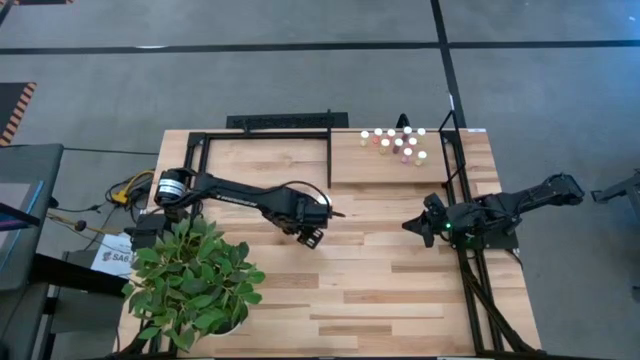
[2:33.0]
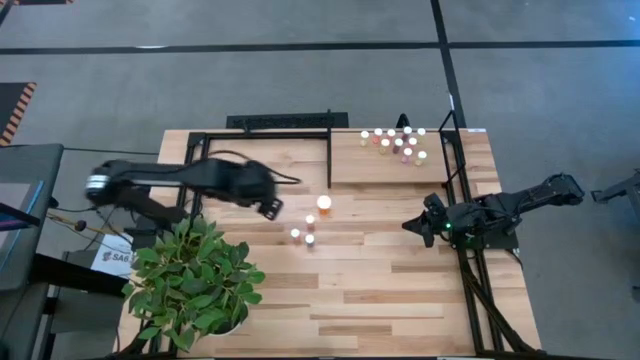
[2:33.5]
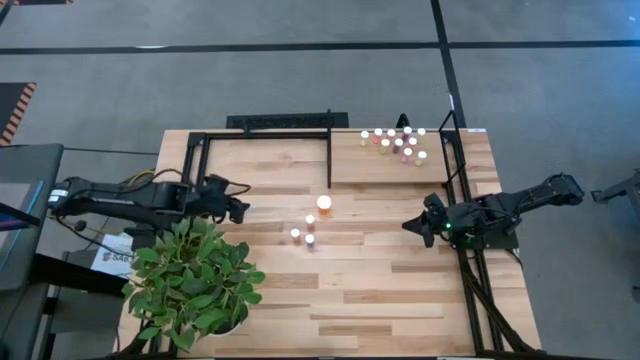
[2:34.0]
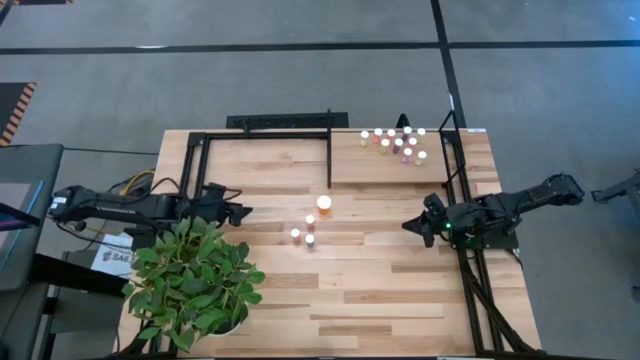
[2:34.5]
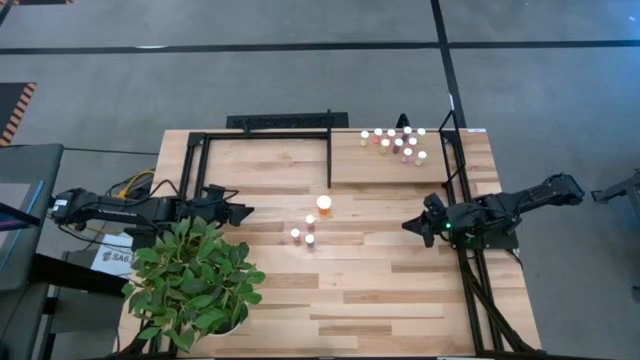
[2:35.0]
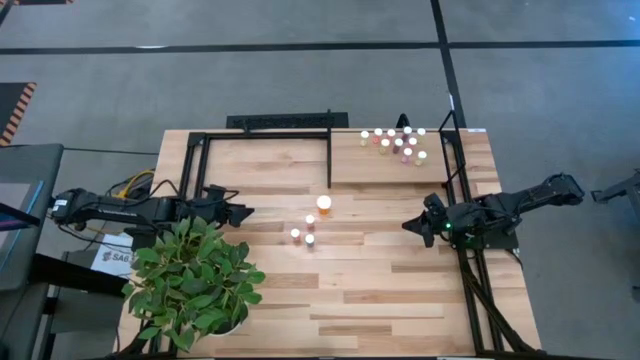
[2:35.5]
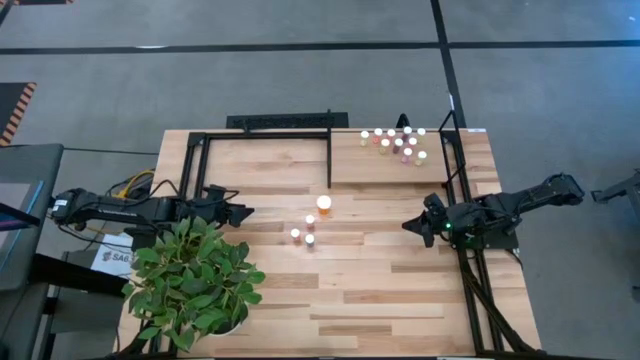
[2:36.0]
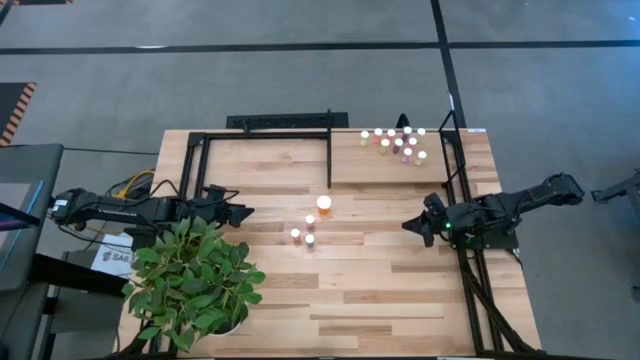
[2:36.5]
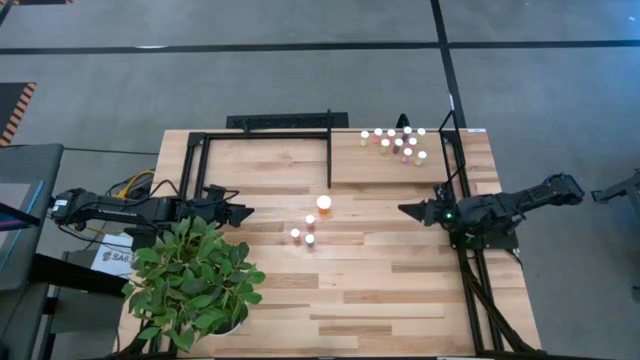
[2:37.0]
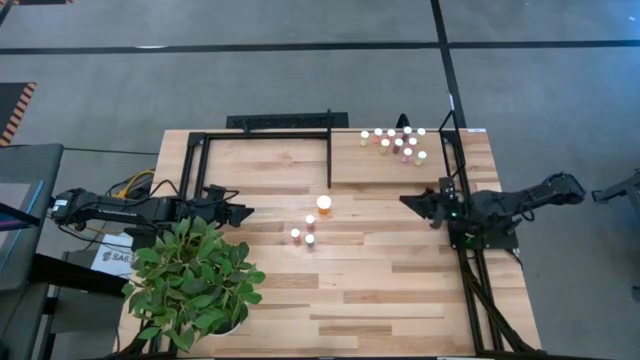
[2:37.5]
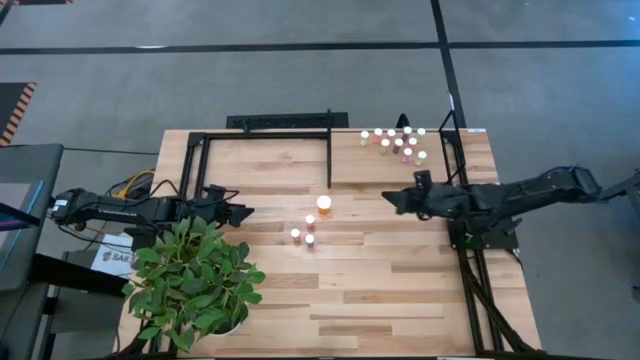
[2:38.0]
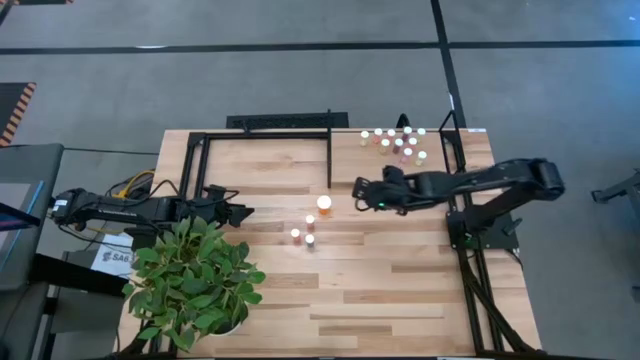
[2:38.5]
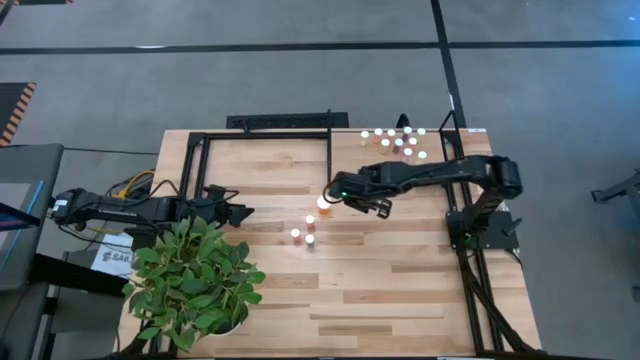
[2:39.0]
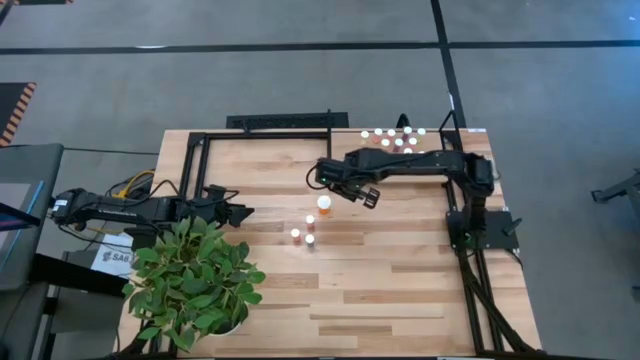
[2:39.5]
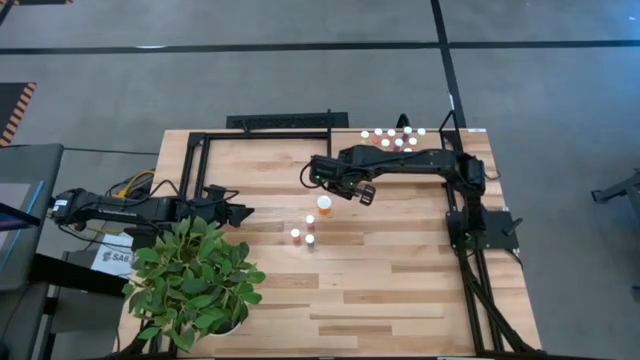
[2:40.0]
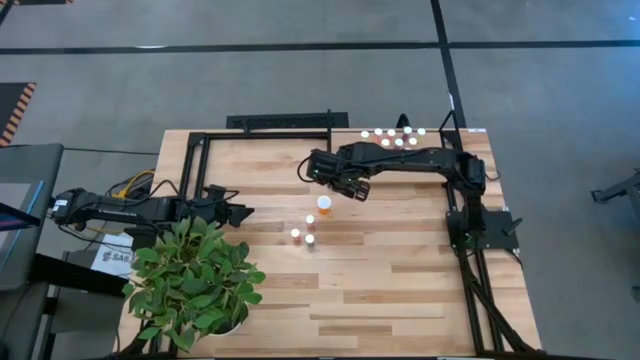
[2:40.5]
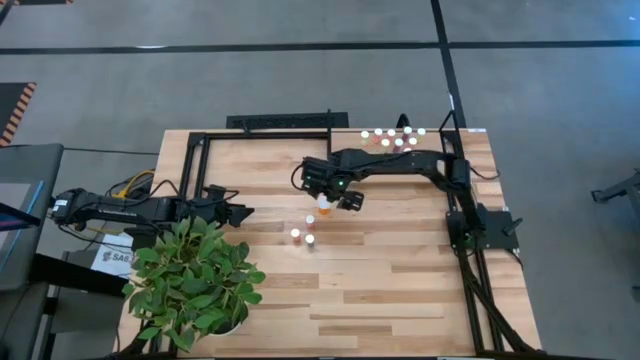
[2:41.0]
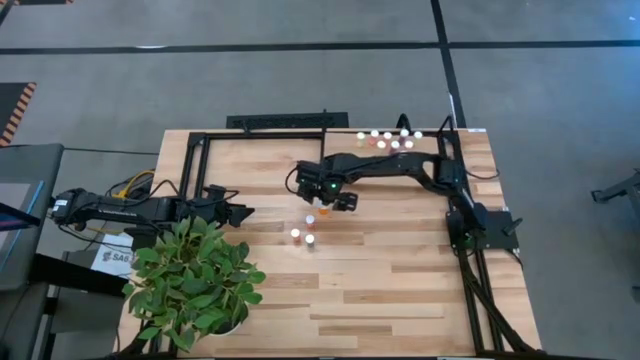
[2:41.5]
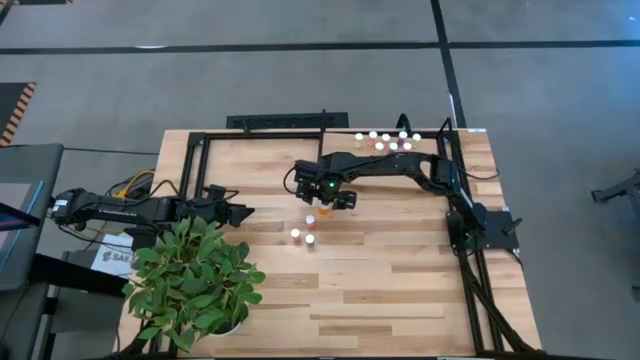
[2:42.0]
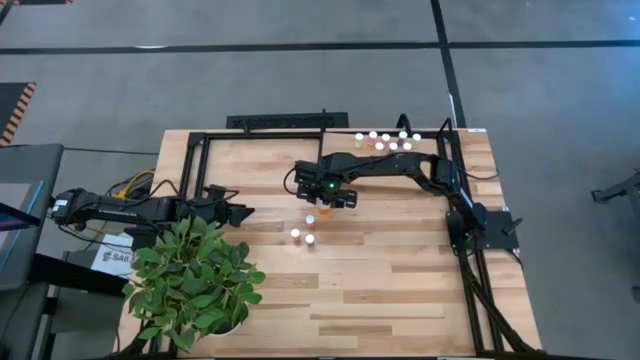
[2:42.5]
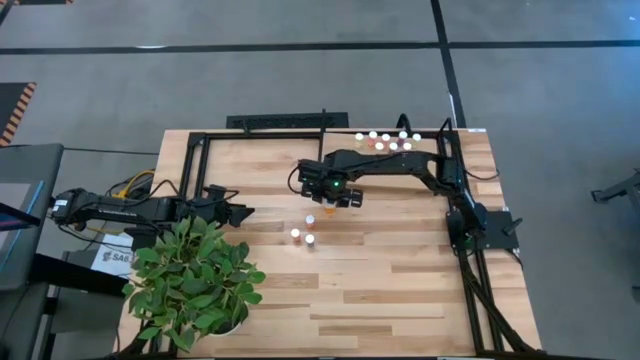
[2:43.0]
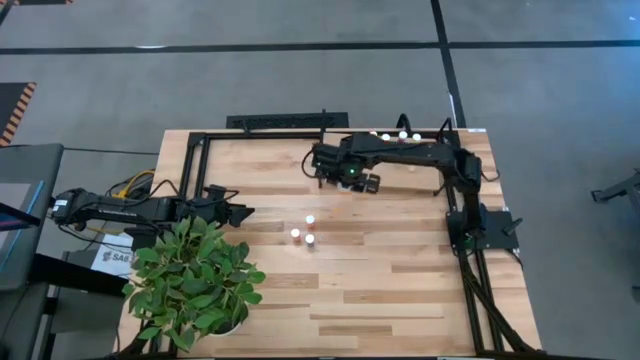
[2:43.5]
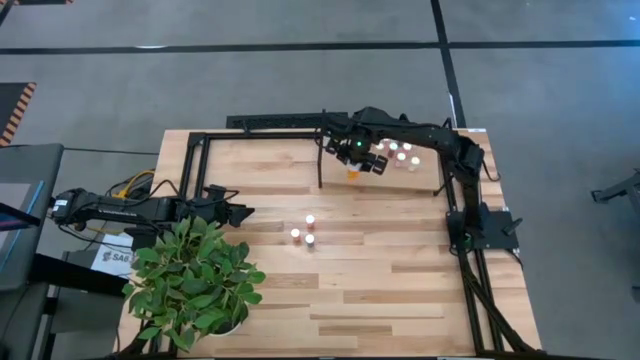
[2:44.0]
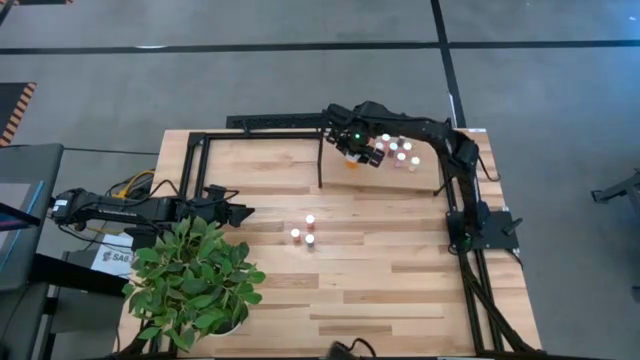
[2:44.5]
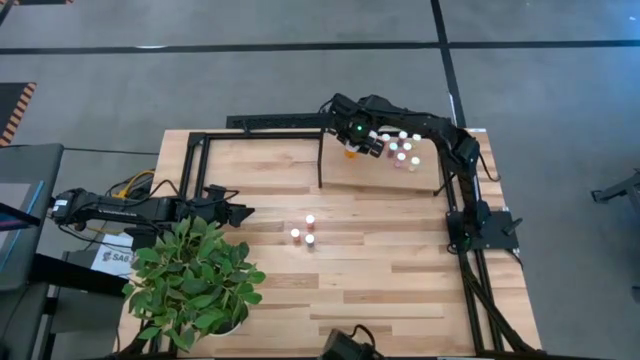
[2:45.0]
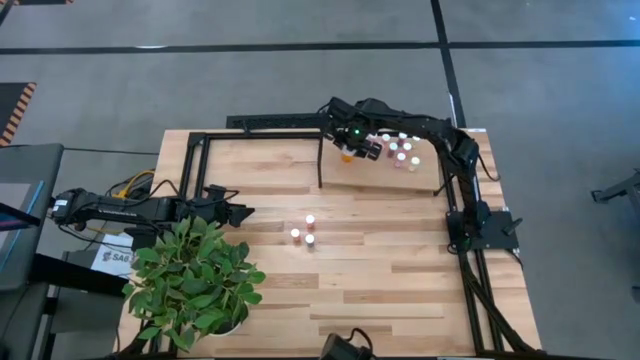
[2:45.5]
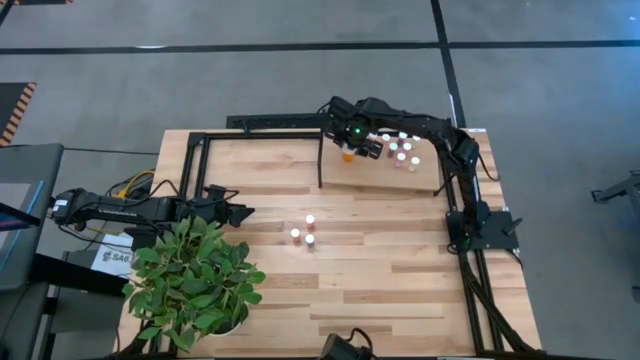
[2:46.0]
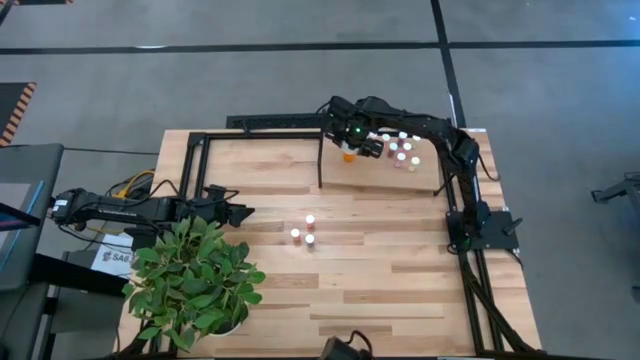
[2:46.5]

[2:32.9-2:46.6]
Task: Pick and place medicine bottles onto shelf by color
Put the orange pill bottle on the shelf

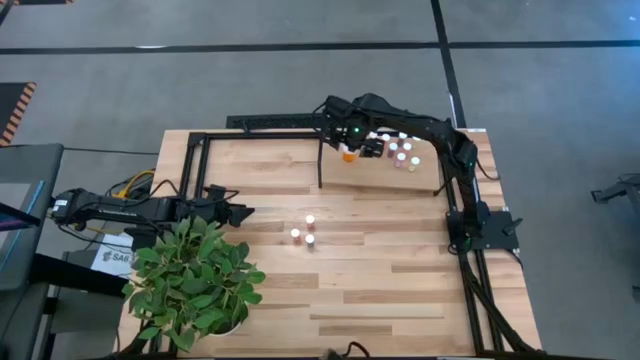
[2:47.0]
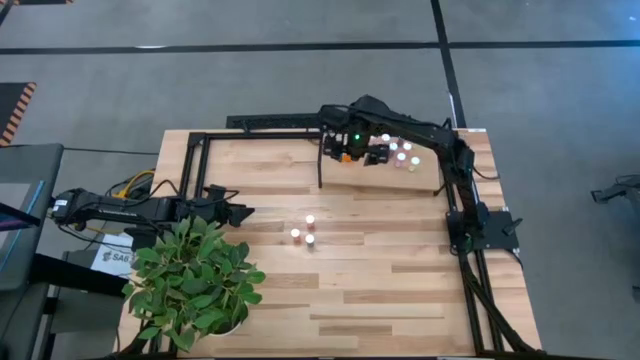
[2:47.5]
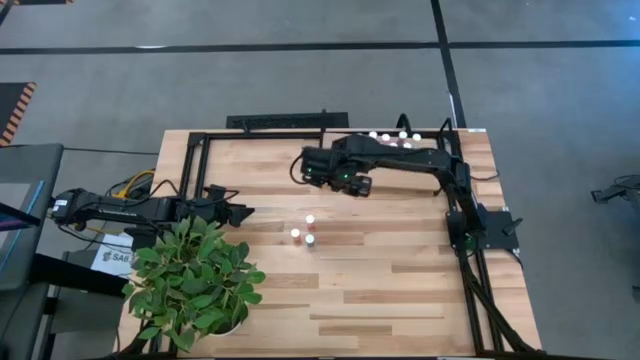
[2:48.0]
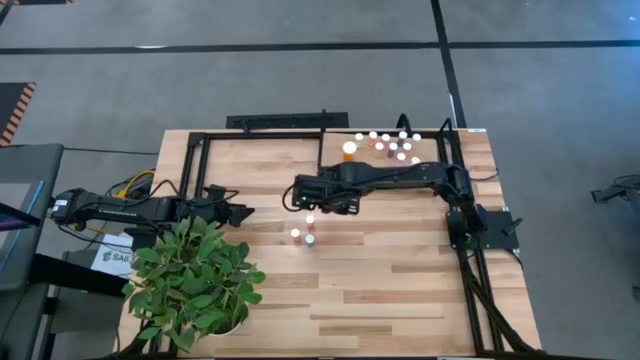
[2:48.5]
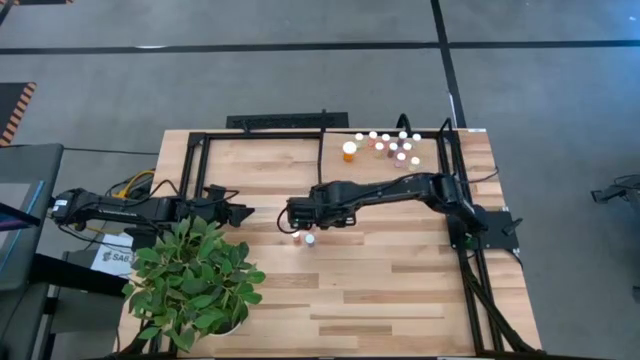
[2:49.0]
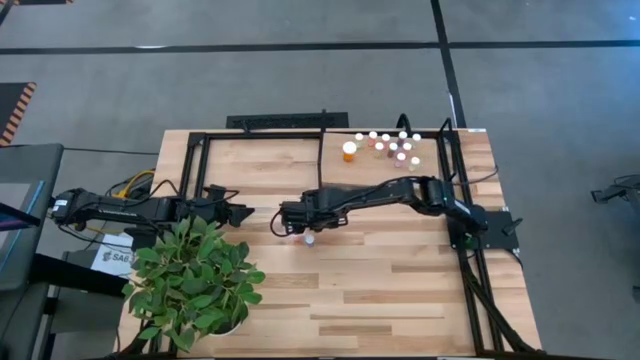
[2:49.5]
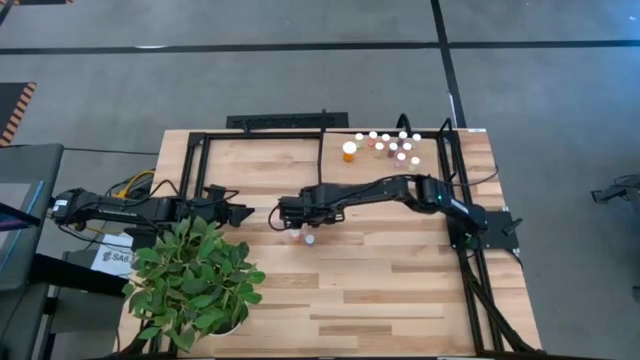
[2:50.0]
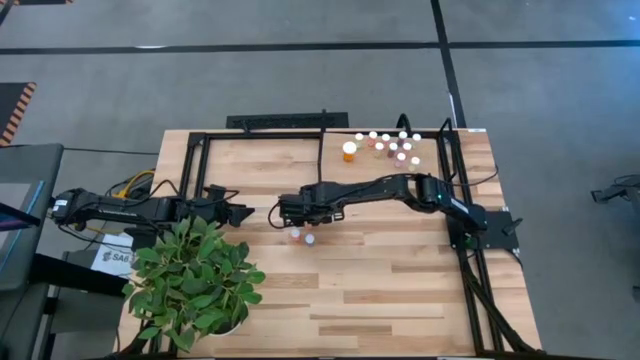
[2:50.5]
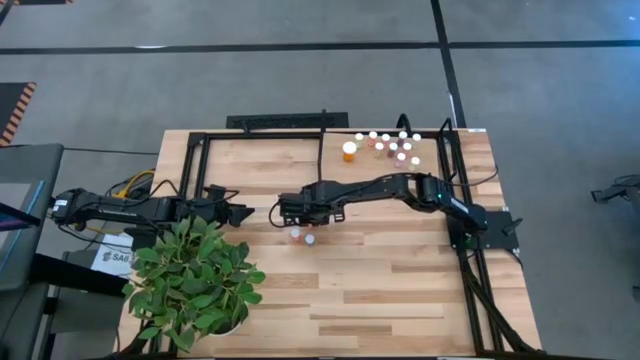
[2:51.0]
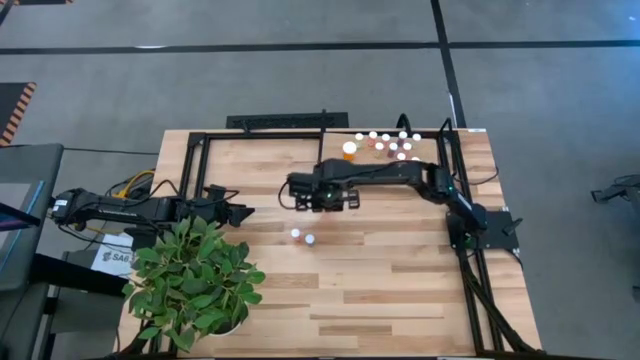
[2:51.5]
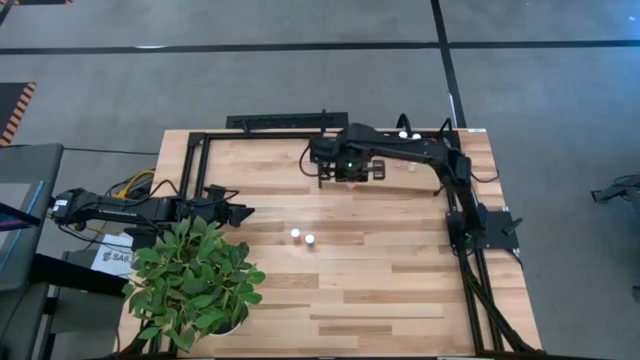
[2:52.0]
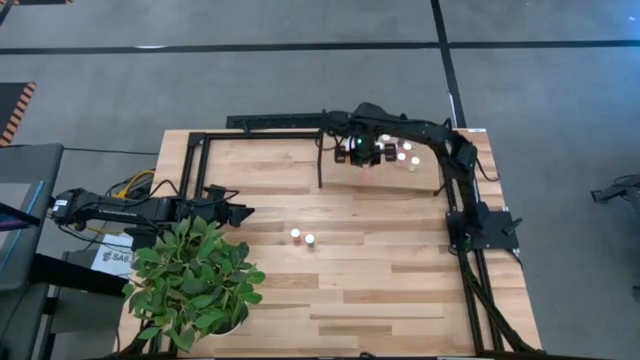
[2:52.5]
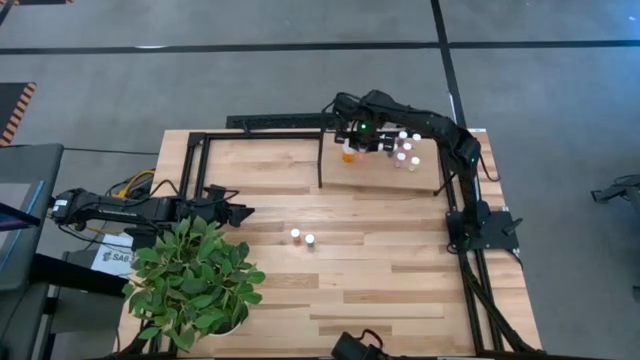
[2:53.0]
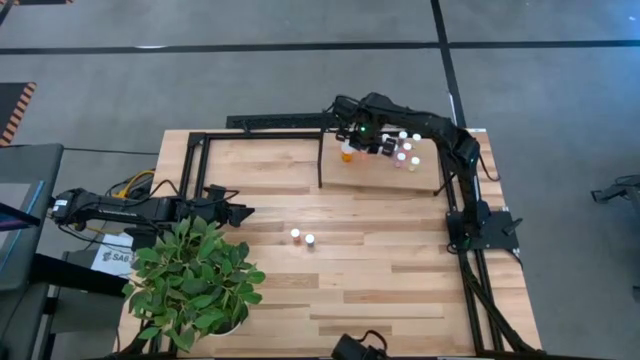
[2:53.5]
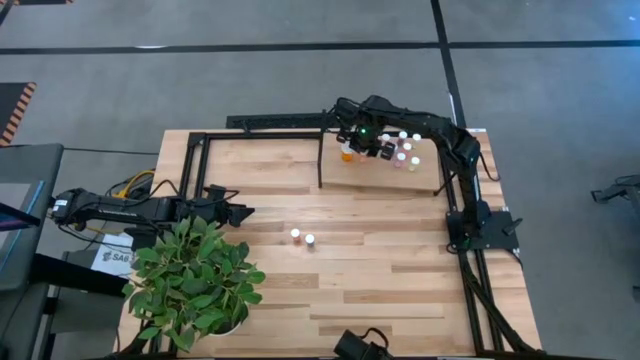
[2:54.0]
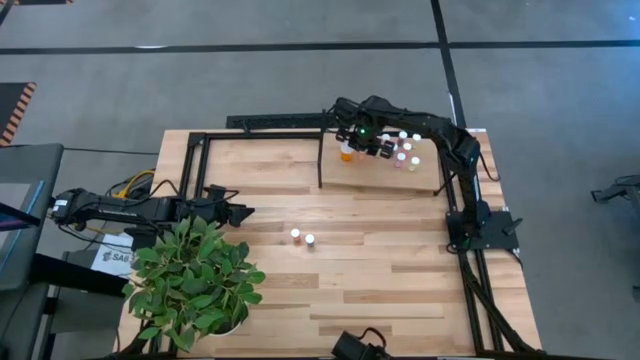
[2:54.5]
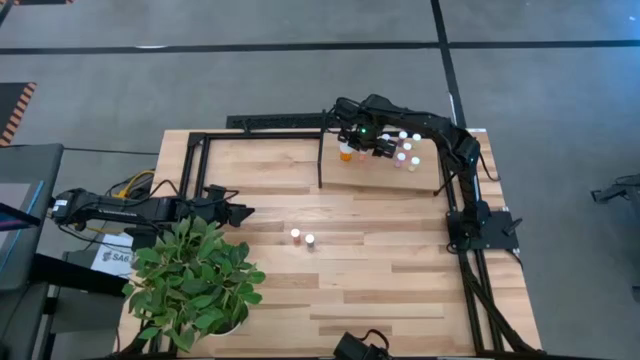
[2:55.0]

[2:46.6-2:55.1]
Put the pink pill bottle on the shelf
